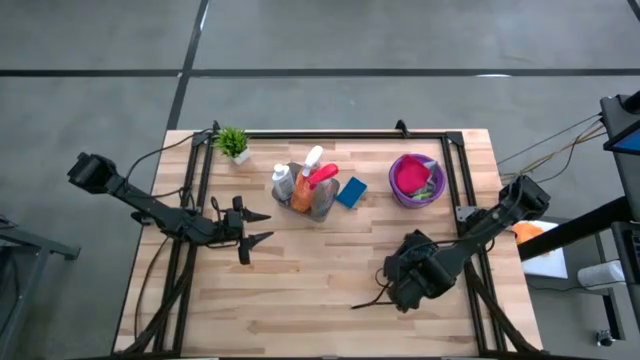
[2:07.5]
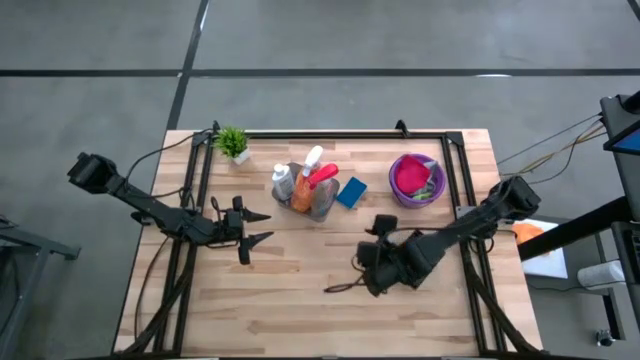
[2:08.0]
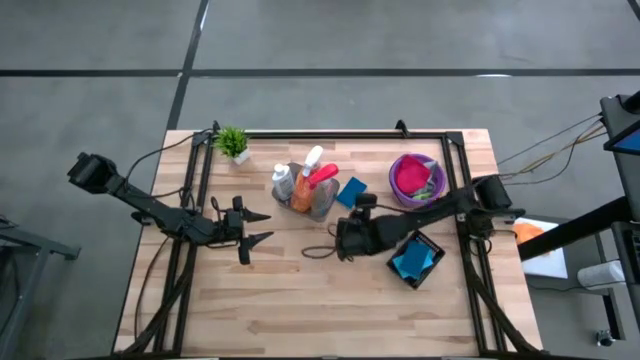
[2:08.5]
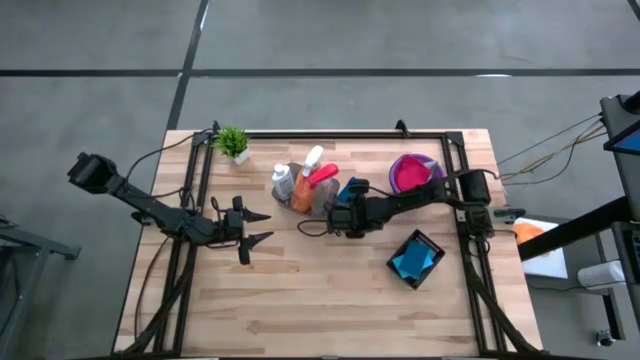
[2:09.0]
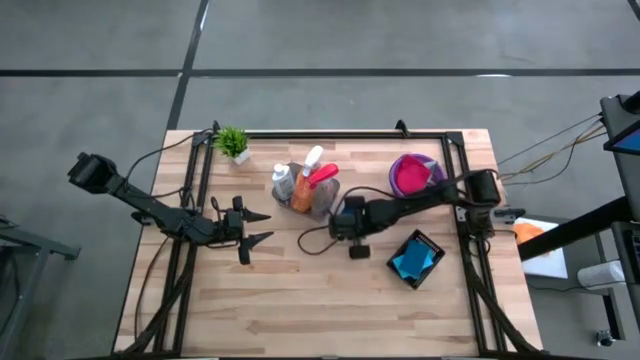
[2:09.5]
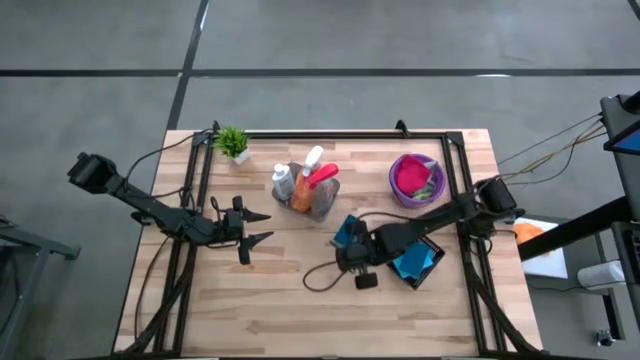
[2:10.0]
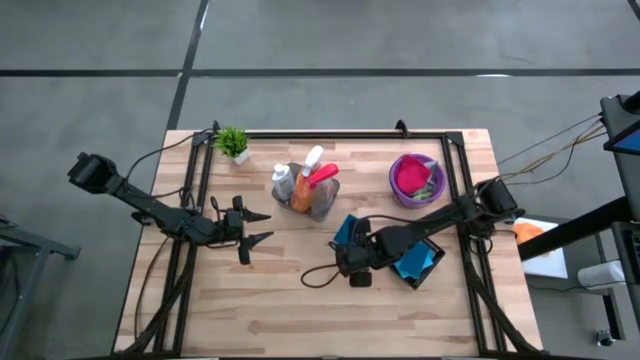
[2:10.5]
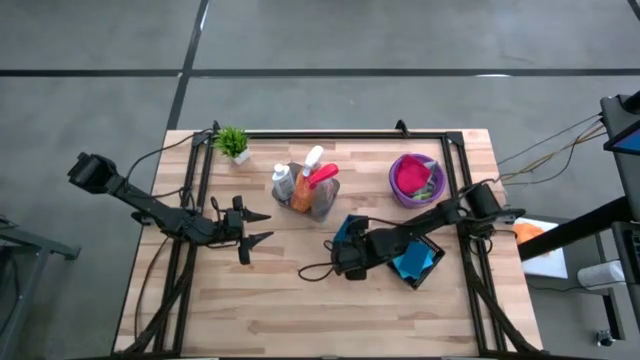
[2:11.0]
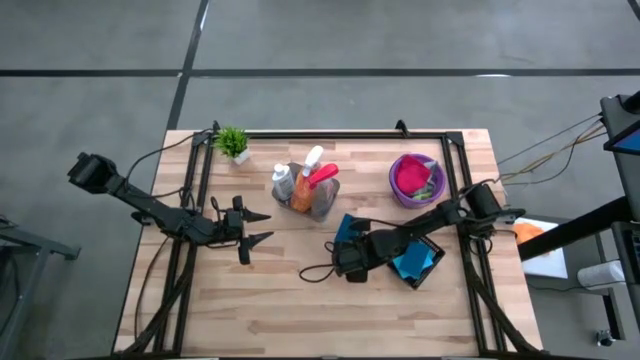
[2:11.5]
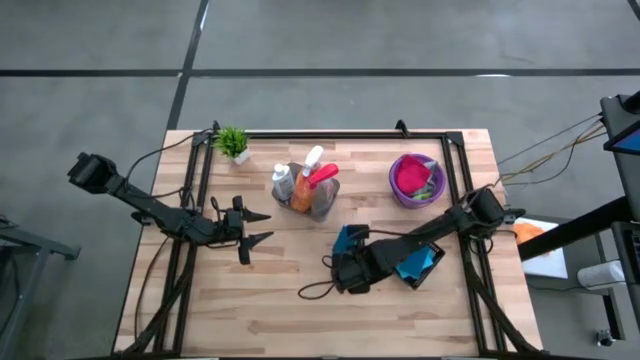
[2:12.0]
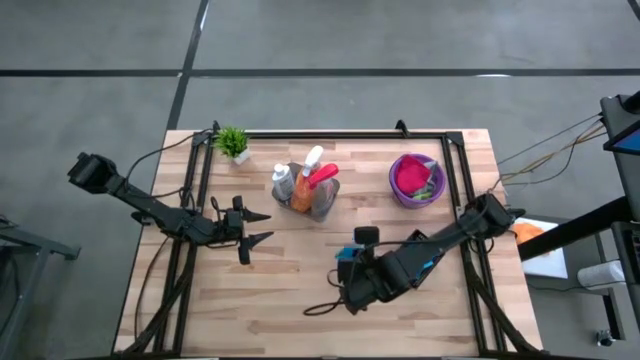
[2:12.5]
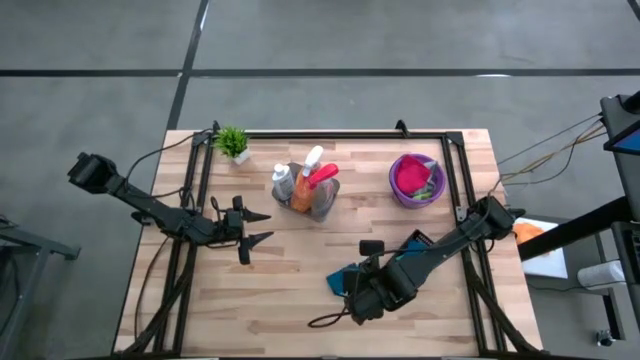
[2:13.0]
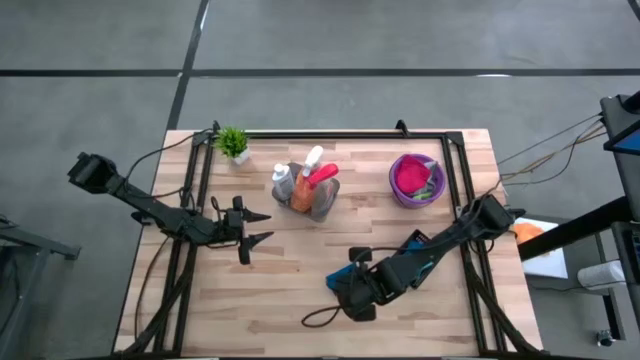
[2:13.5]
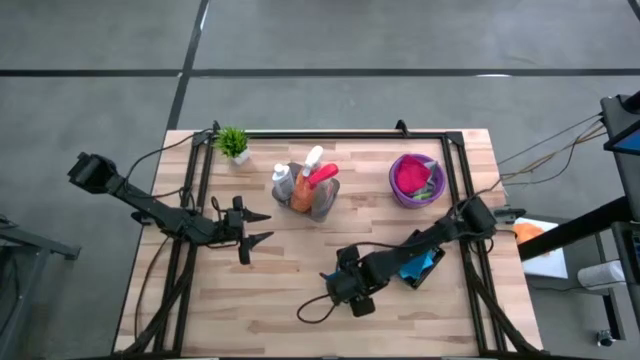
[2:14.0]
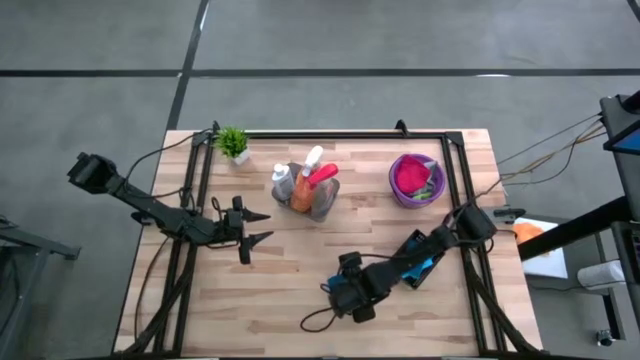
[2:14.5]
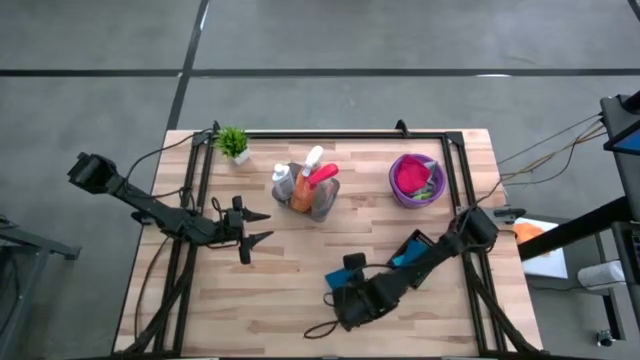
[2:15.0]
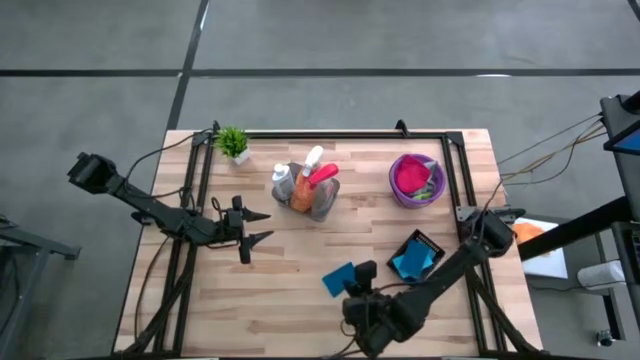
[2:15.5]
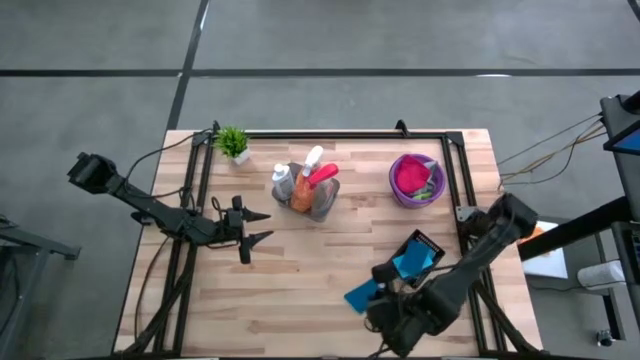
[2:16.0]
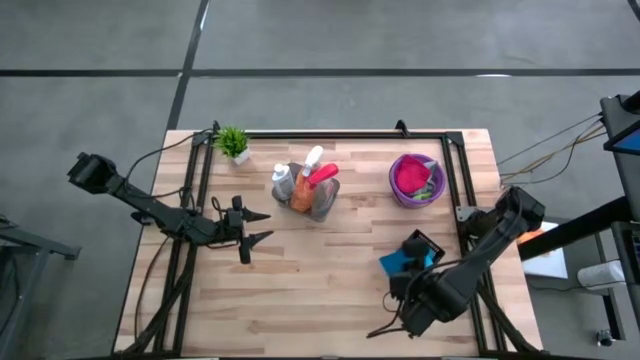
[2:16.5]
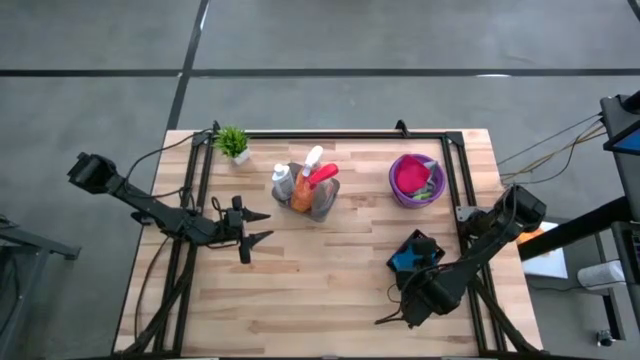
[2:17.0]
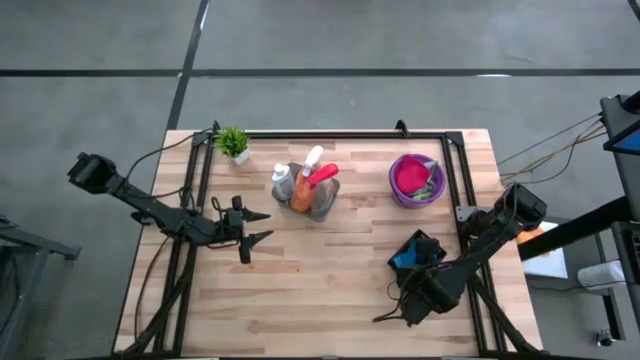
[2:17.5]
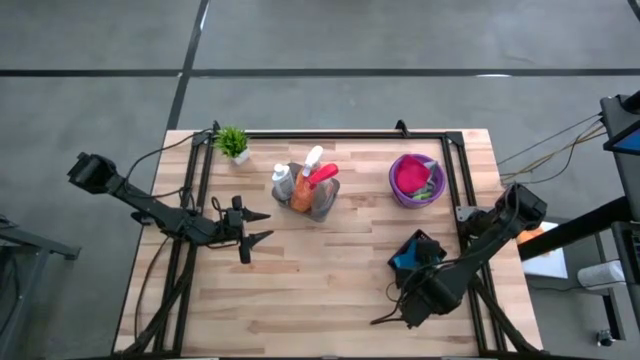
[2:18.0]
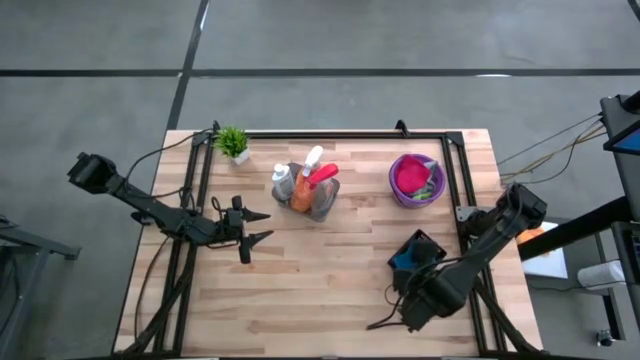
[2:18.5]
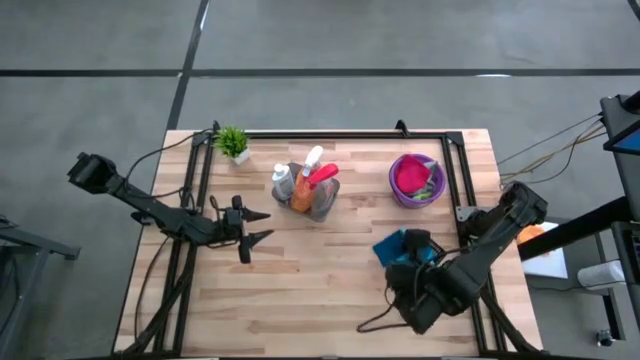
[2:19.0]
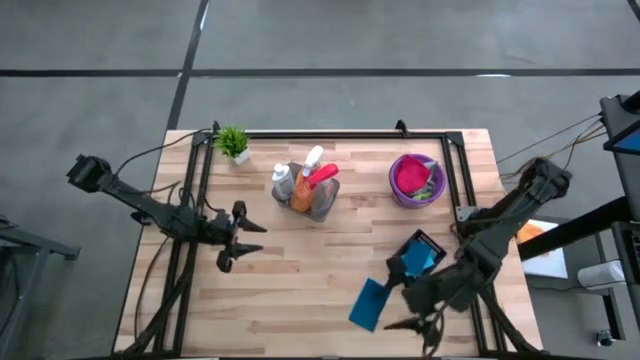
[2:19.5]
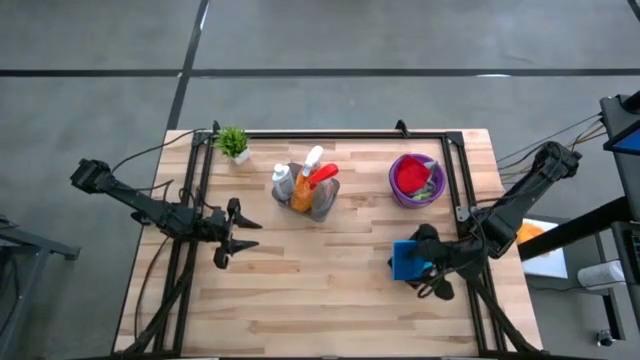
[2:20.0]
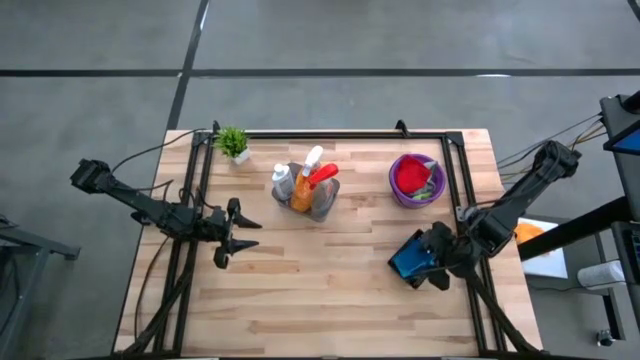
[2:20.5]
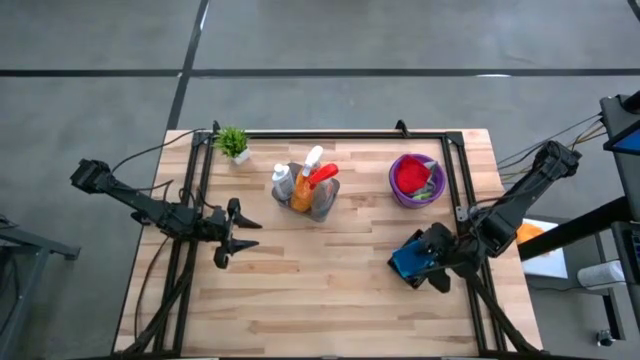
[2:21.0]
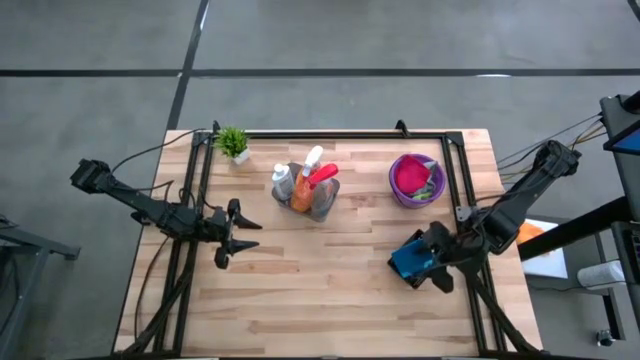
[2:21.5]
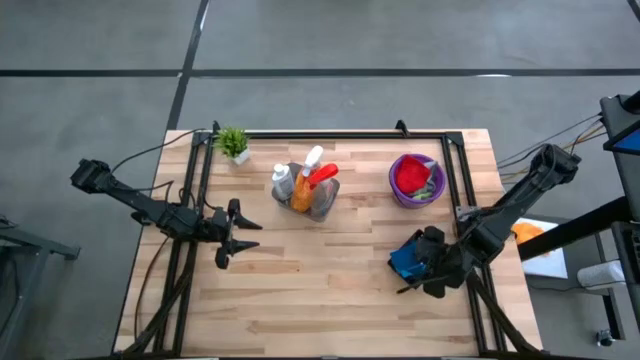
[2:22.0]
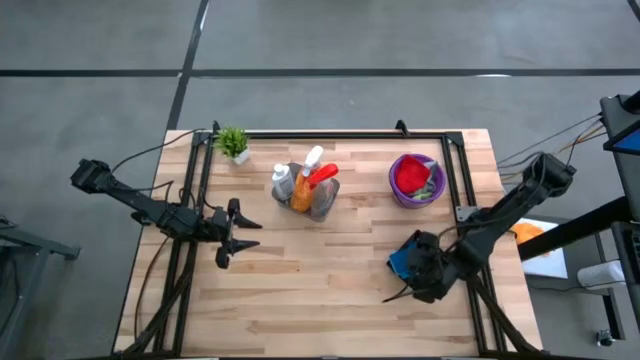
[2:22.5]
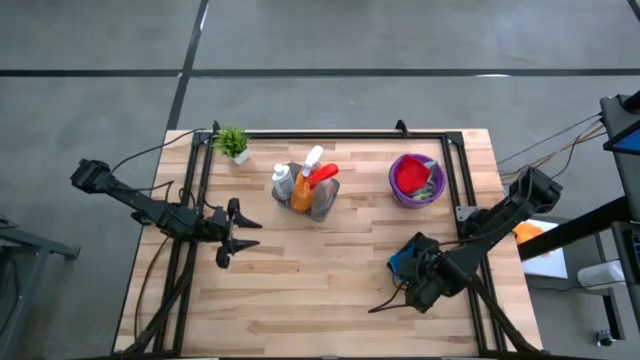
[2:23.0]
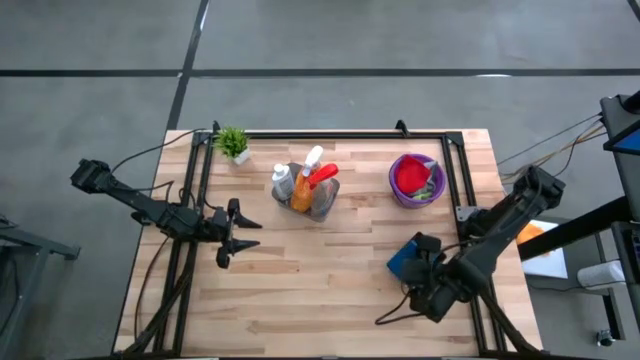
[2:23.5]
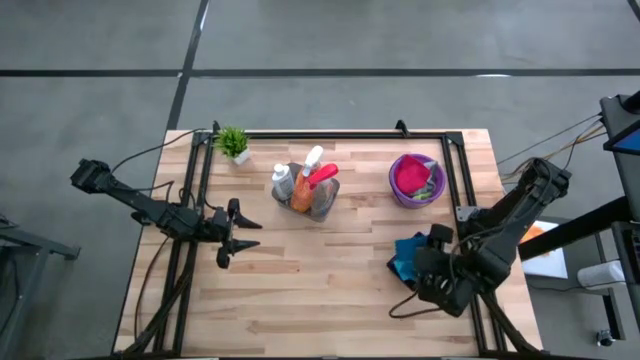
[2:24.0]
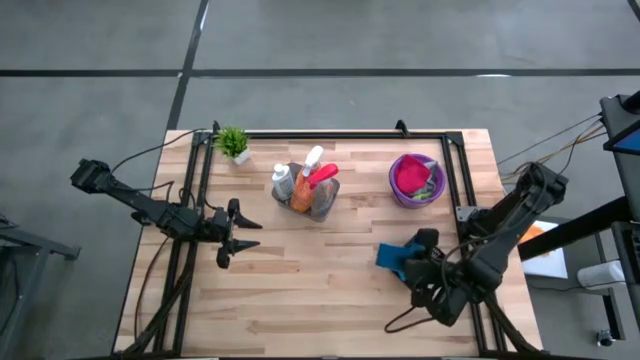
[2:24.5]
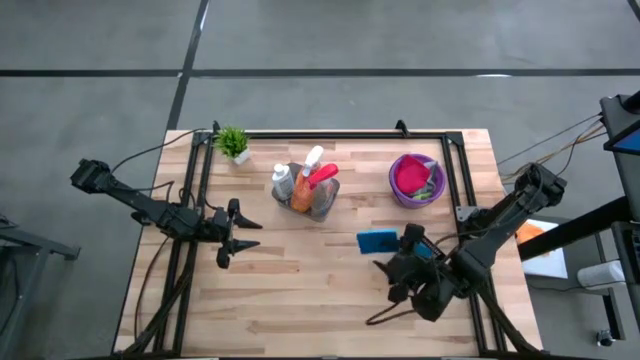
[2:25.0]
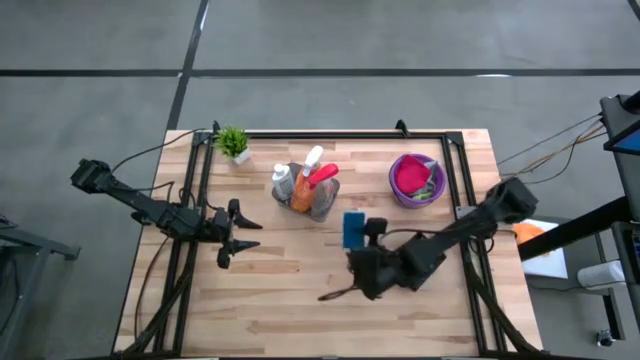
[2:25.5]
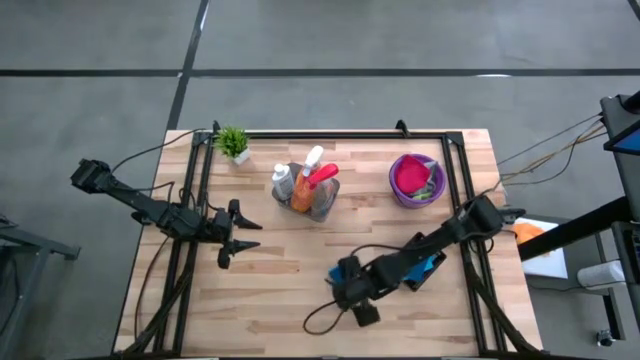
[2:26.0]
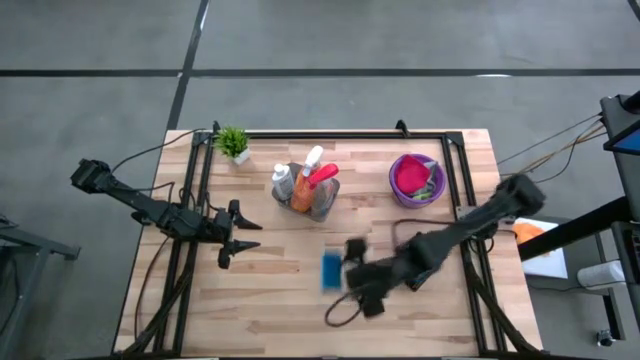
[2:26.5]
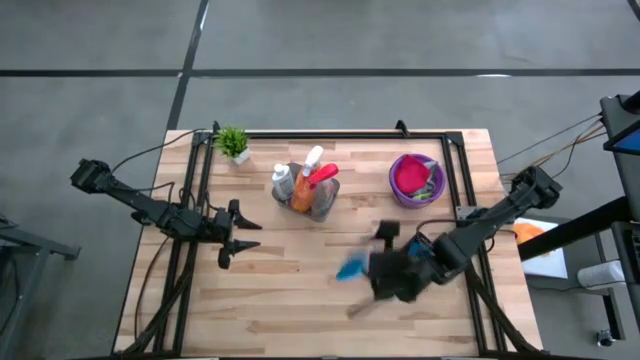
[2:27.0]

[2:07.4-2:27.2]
Task: Pick & Place Kitchen Items
Put the blue sponge into the black basket

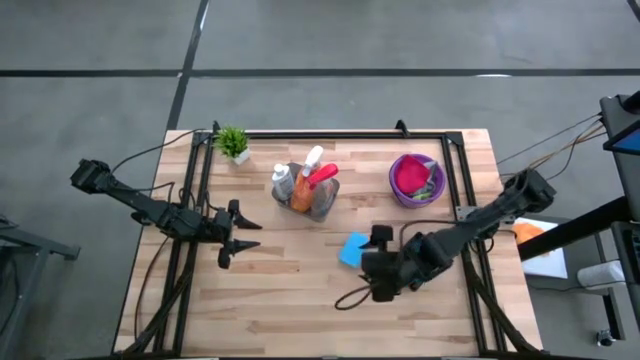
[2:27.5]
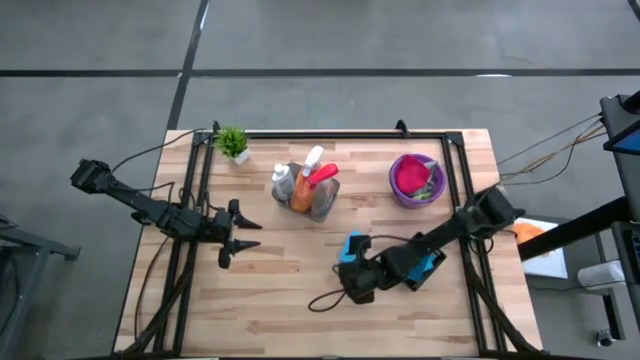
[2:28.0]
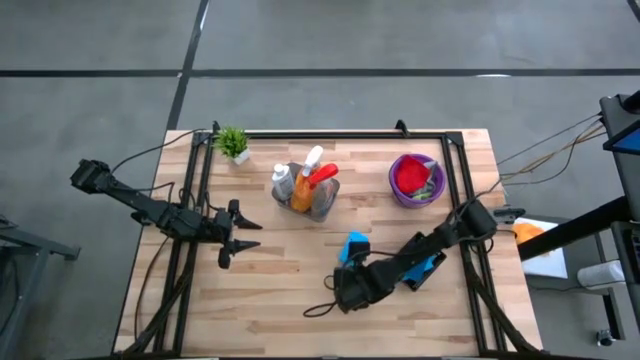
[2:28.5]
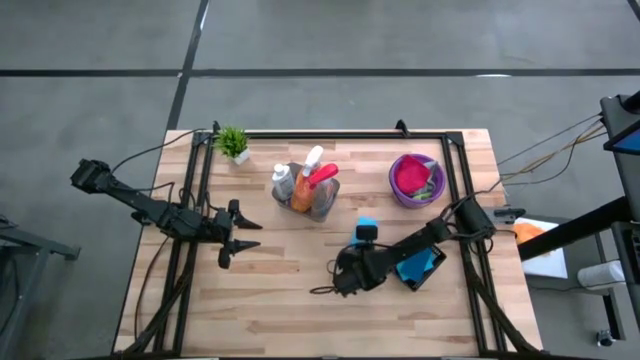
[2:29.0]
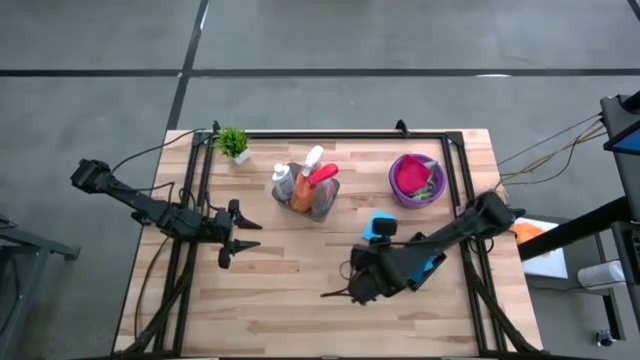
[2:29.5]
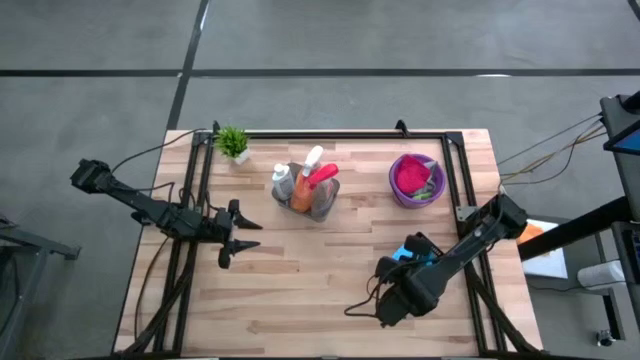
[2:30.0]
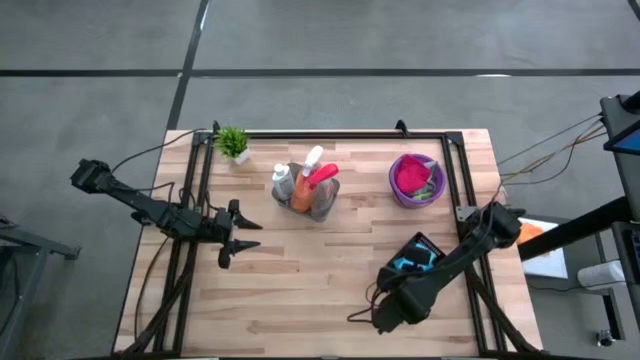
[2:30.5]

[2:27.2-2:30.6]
Put the blue sponge into the black basket
